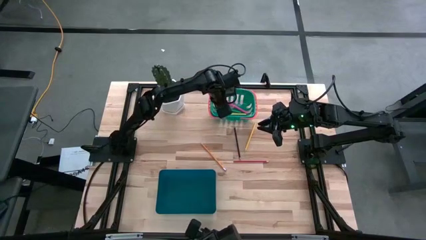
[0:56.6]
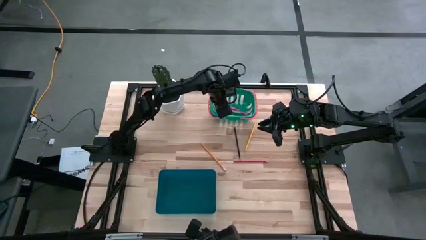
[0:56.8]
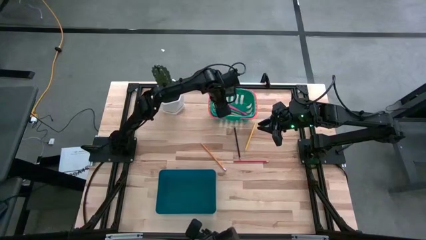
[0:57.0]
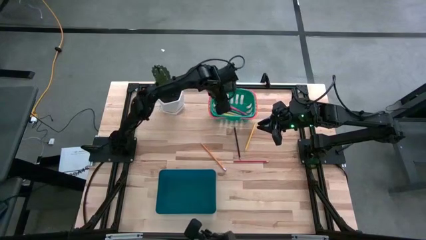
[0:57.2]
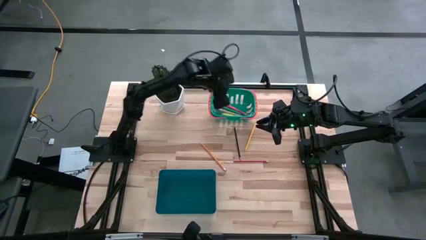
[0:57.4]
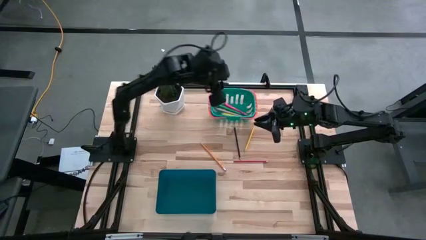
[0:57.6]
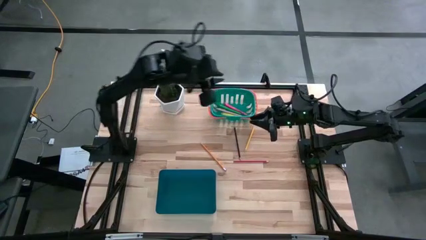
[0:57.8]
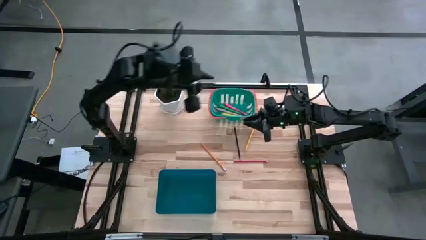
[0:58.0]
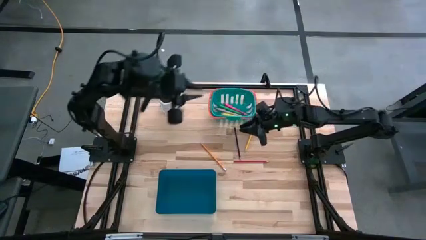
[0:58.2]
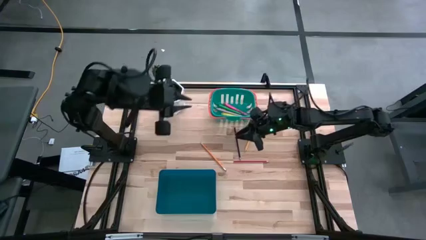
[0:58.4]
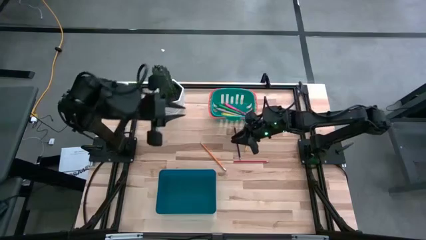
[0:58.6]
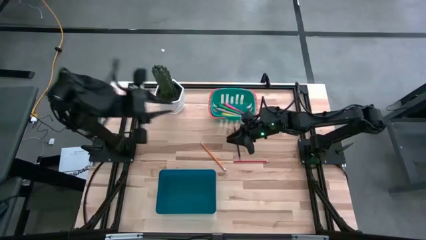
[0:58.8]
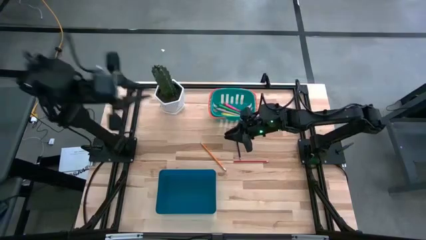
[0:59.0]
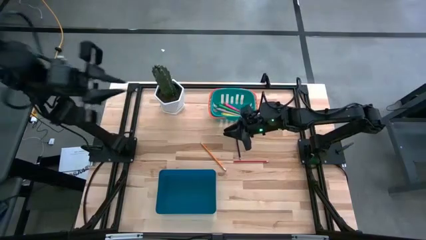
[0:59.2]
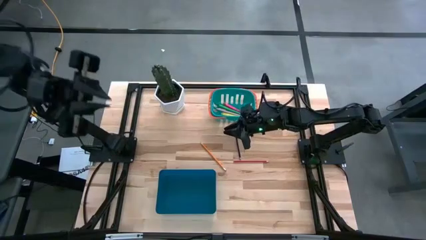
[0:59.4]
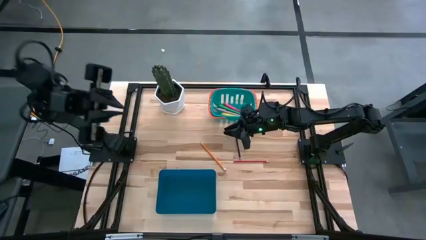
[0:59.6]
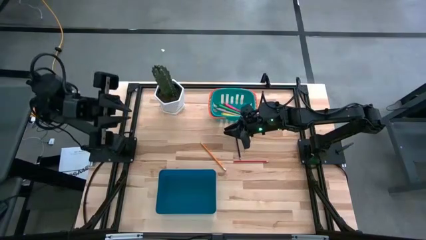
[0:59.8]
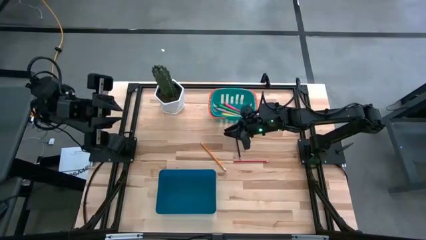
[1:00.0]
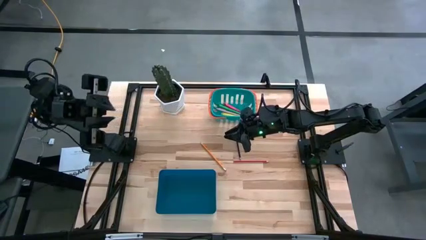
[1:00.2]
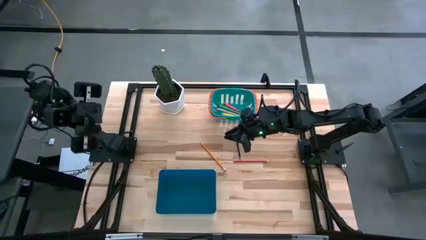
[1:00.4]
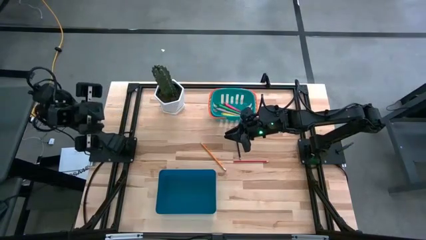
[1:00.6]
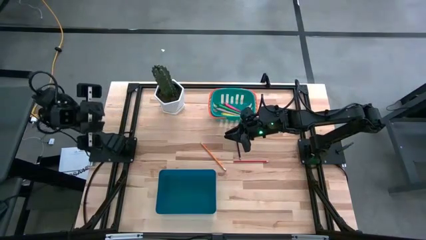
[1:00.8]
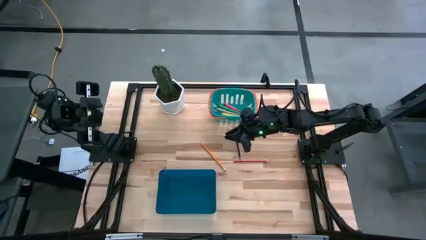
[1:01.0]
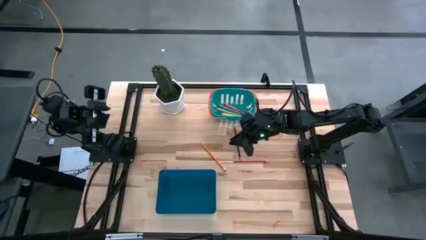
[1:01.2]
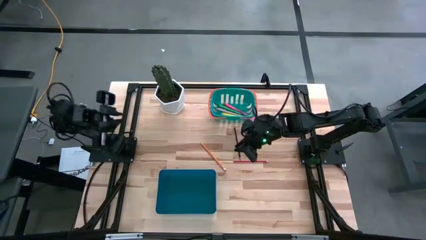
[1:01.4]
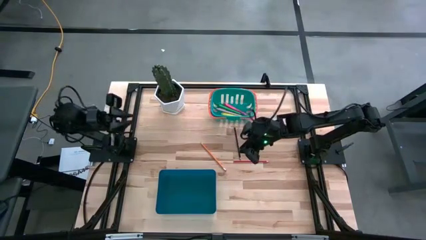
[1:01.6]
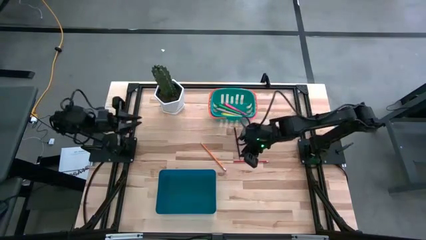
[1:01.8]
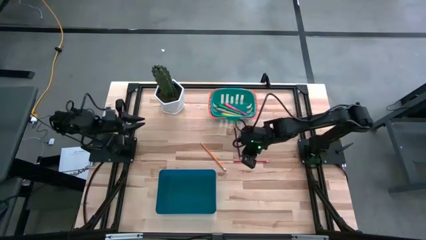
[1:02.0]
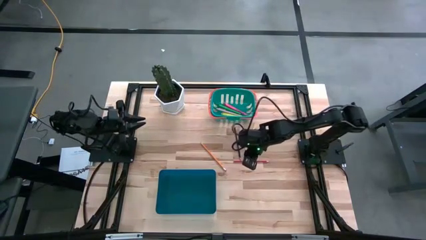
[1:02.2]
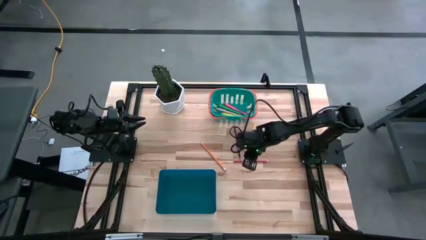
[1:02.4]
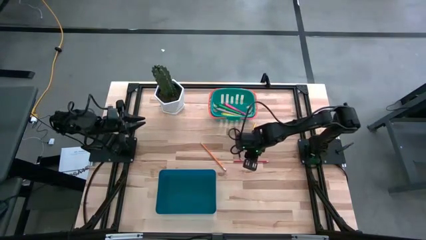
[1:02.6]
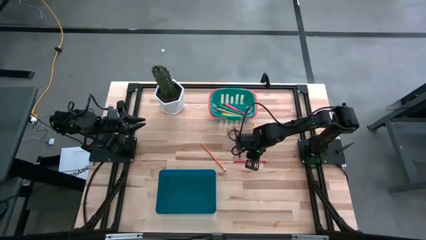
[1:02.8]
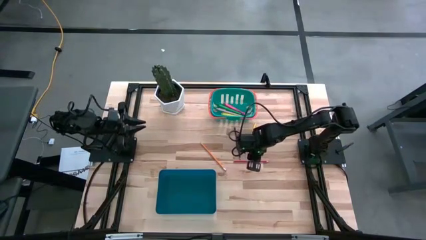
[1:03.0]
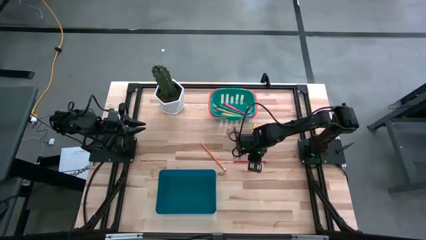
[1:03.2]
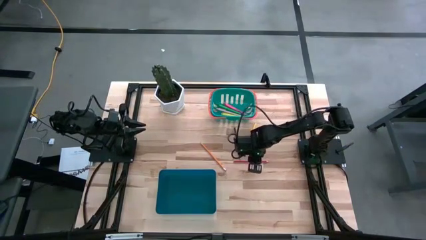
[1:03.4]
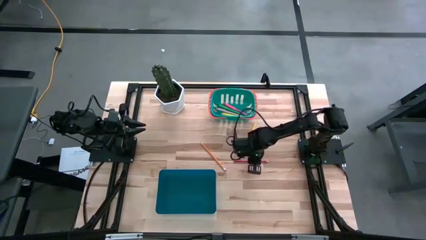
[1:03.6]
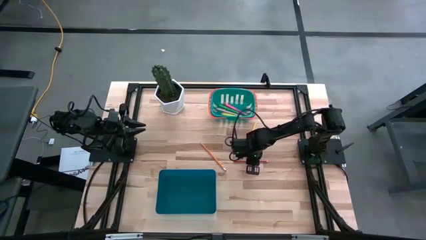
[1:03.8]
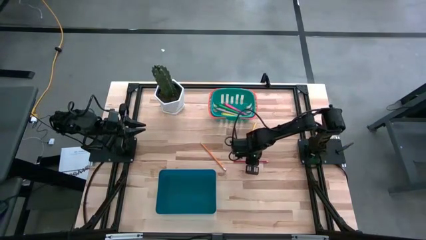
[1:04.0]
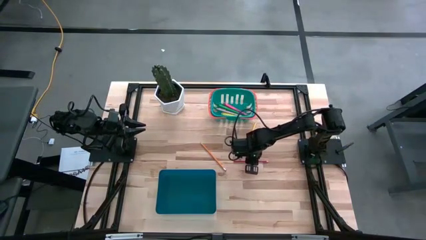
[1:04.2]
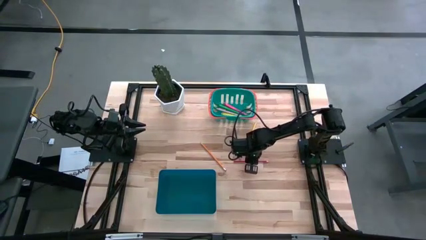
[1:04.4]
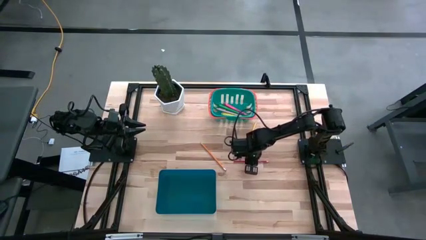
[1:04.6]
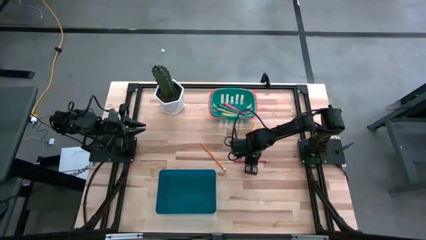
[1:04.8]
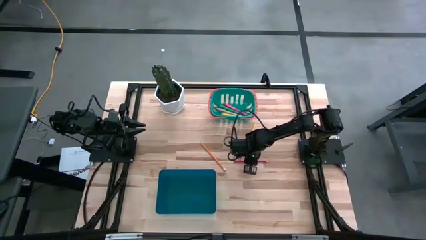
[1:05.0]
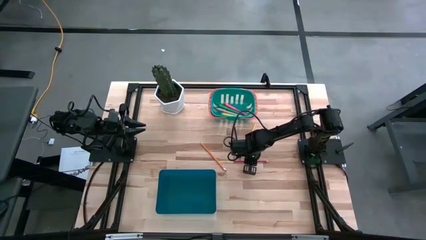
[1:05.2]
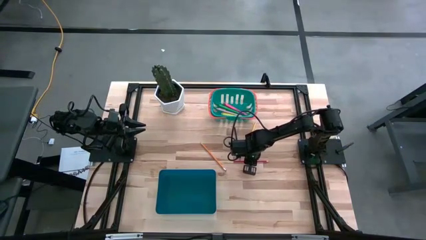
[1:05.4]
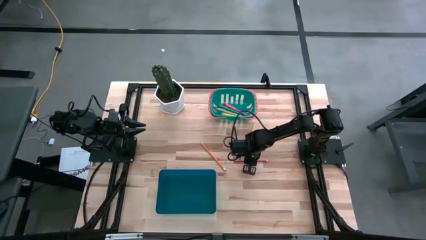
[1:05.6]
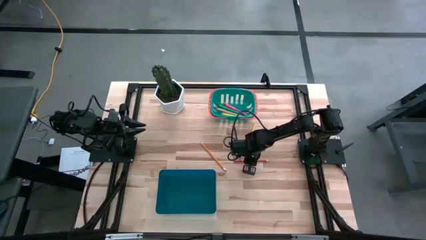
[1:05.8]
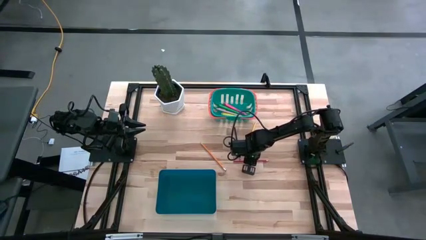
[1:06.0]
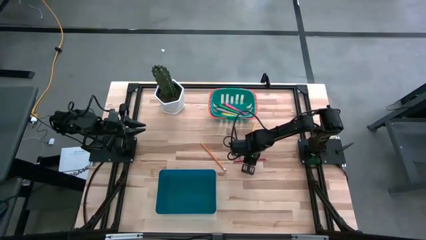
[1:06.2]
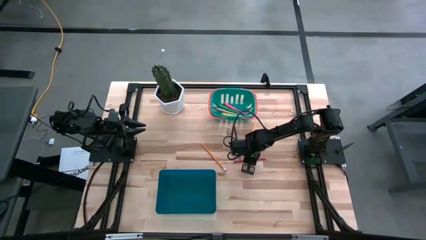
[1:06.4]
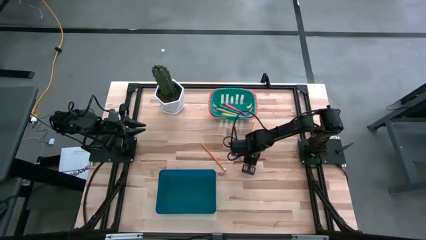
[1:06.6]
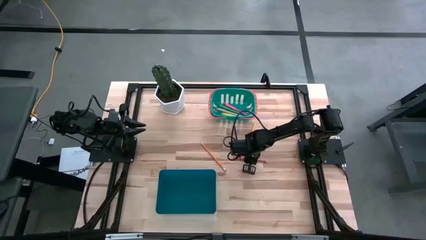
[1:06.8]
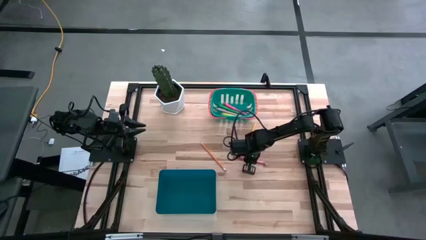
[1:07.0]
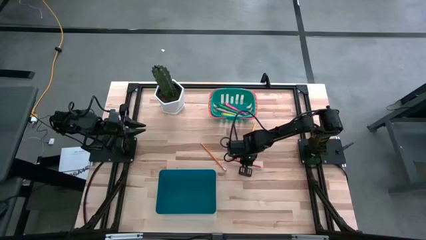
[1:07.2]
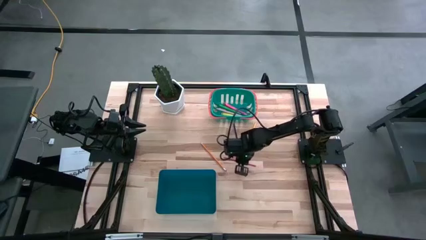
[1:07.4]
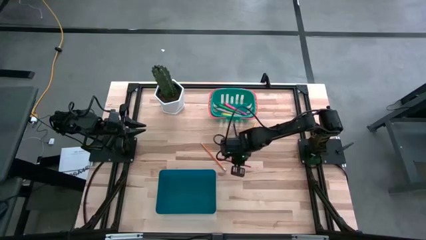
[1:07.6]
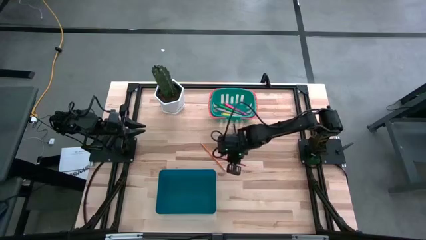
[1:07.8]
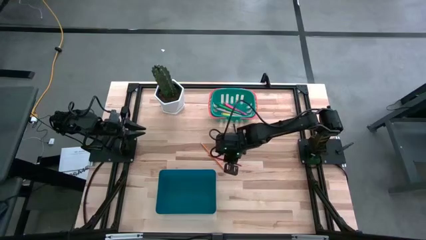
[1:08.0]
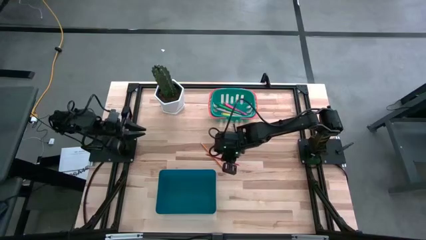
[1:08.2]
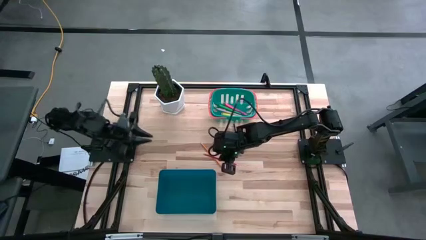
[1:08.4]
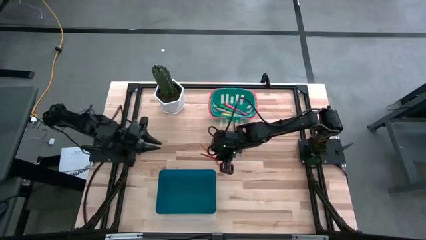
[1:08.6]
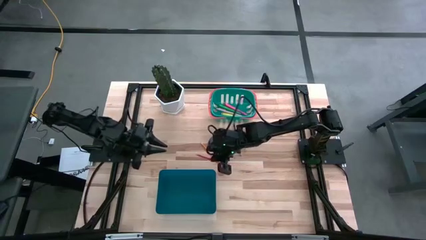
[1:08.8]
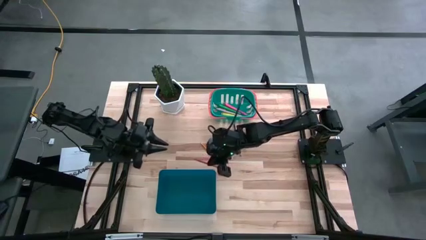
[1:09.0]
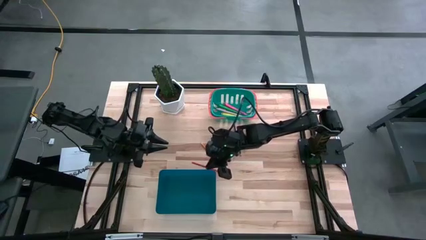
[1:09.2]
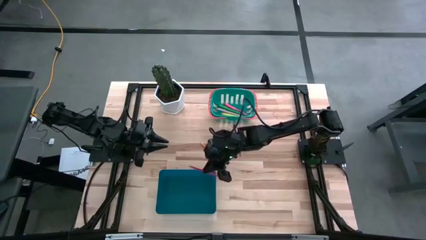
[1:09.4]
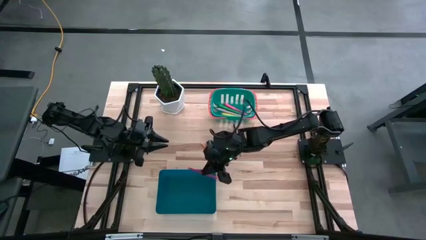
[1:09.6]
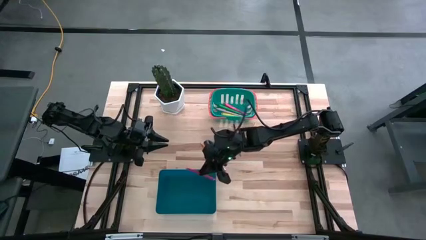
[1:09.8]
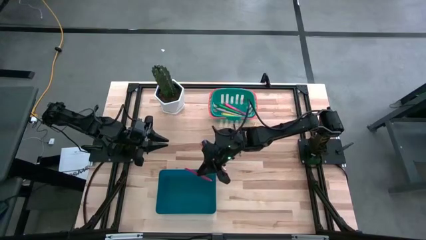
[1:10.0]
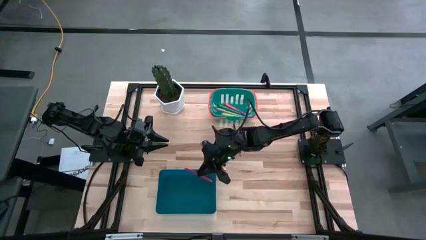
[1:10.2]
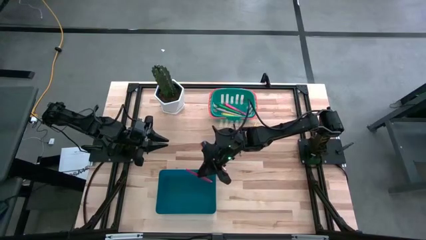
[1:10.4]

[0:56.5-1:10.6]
Task: Sort pens & pencils
Put the red pencil into the blue bin
